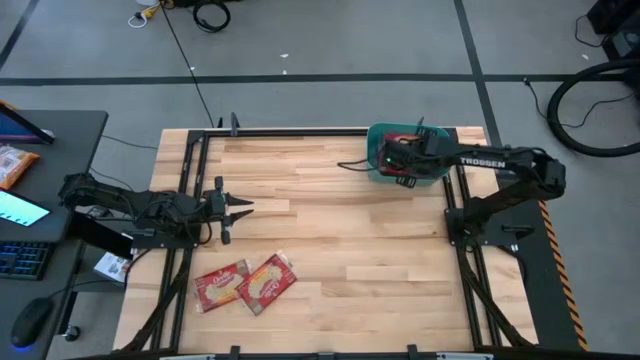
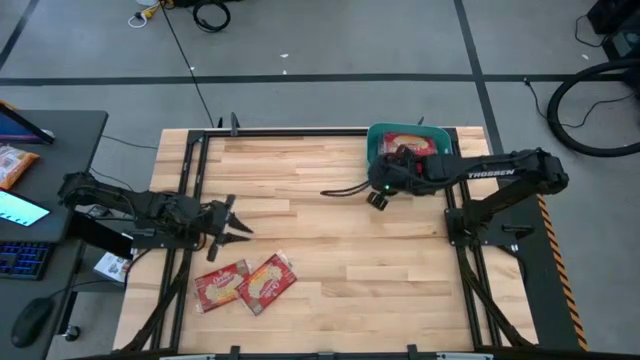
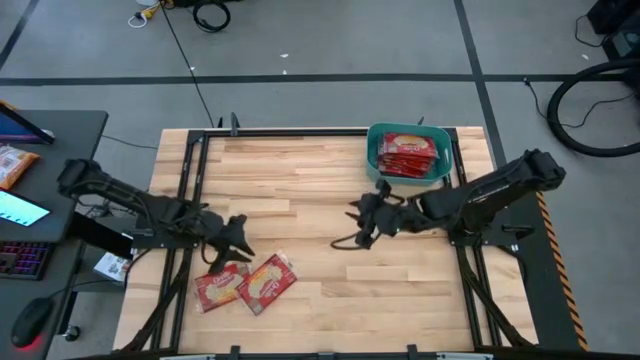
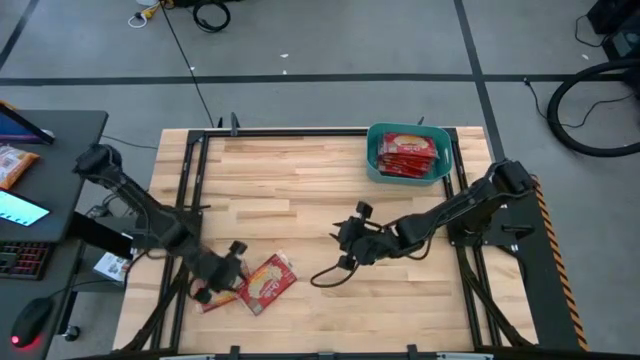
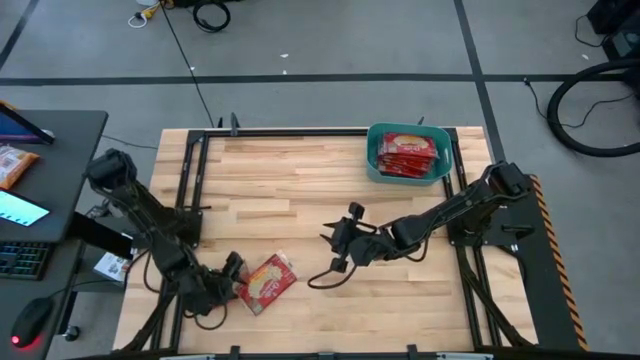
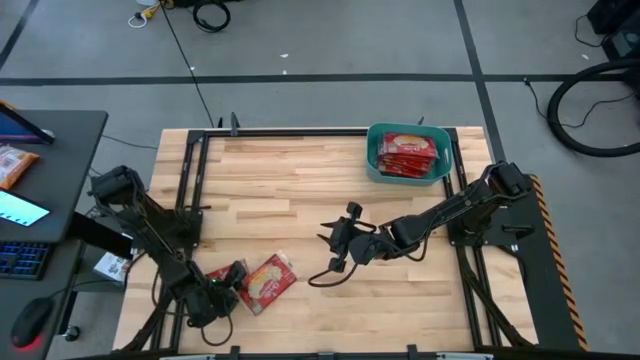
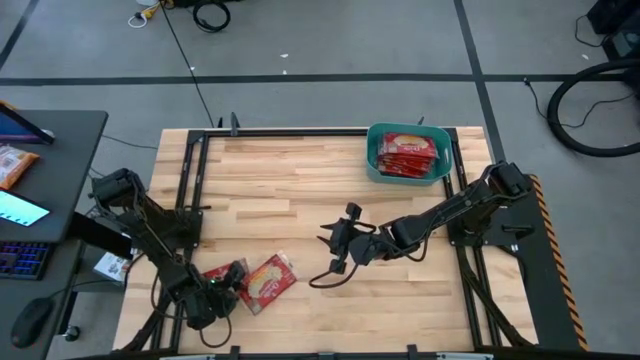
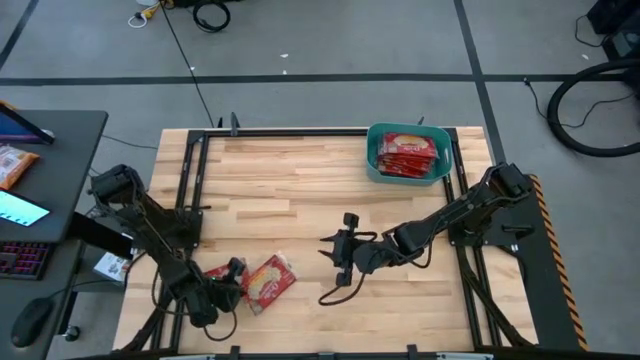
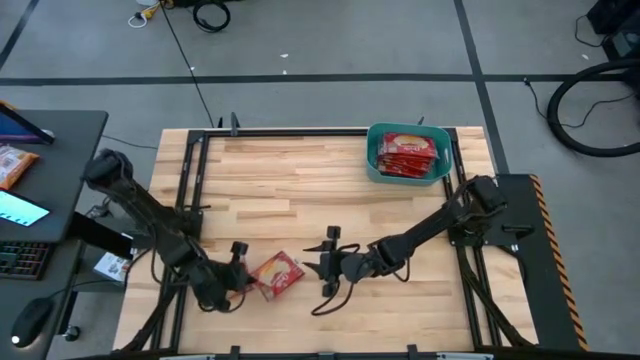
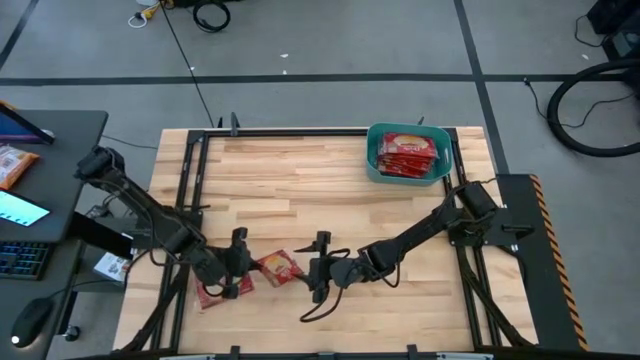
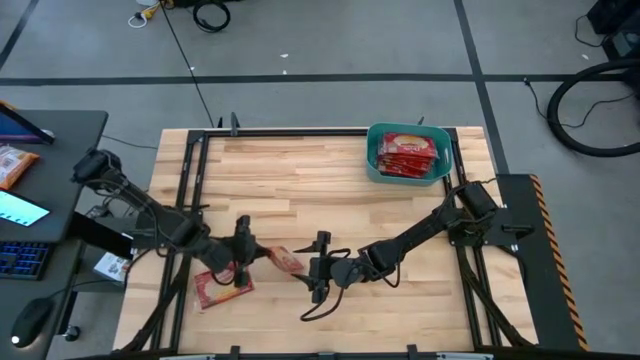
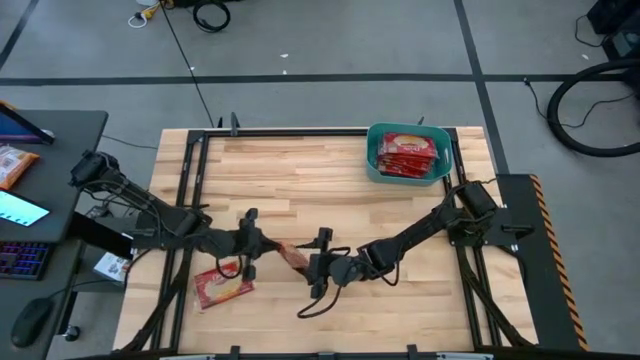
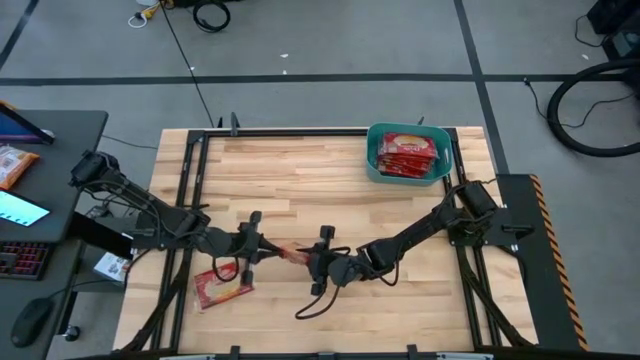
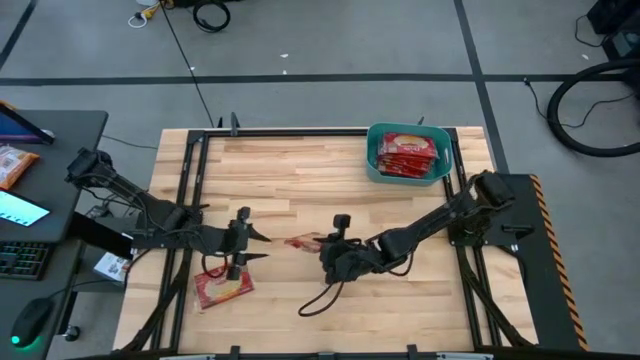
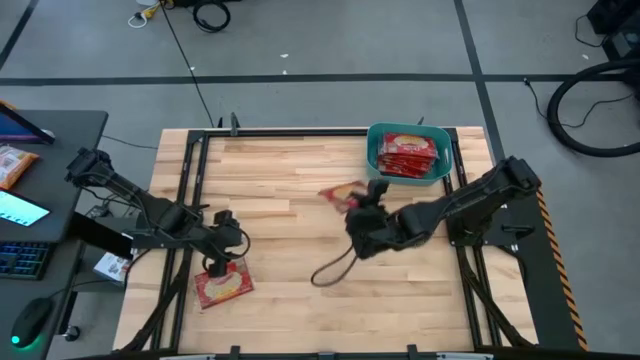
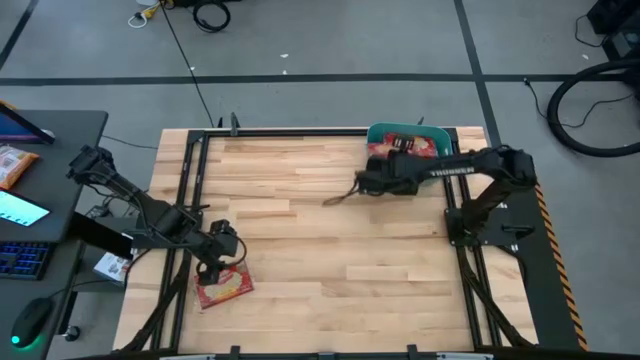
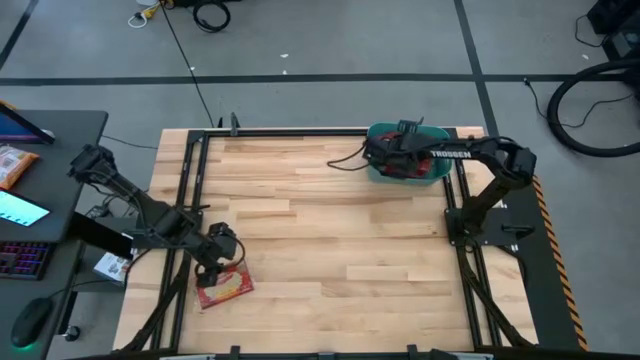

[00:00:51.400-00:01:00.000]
Task: Sort popcorn bags into baskets
Put the red popcorn bag into the blue bin

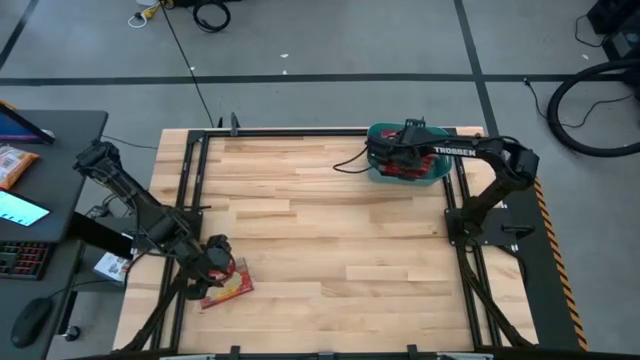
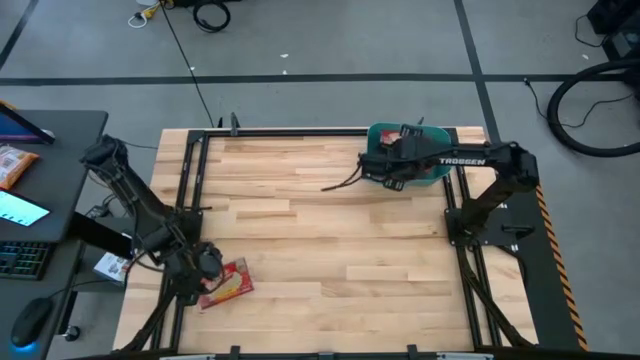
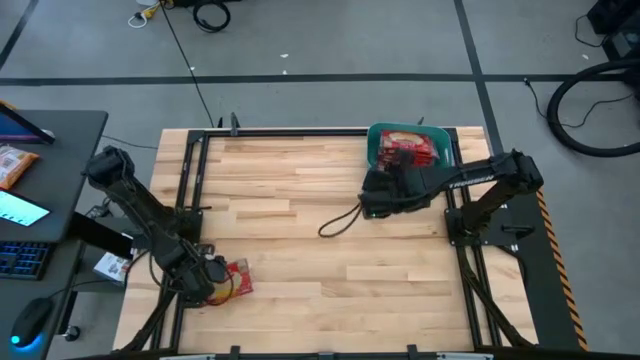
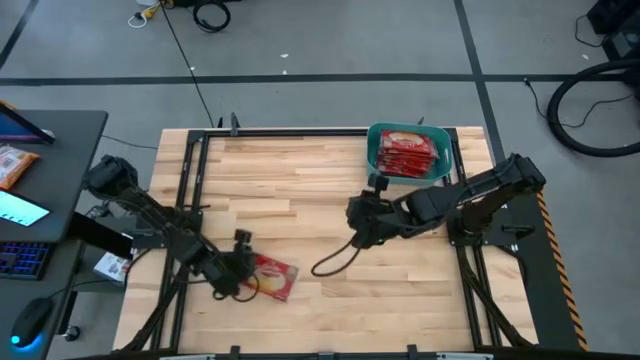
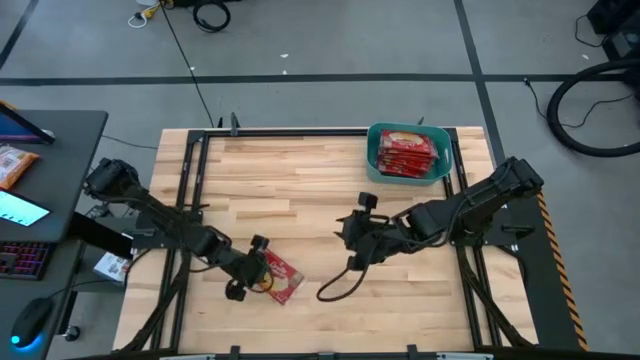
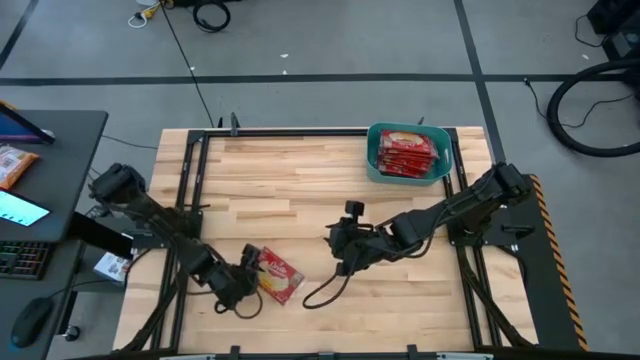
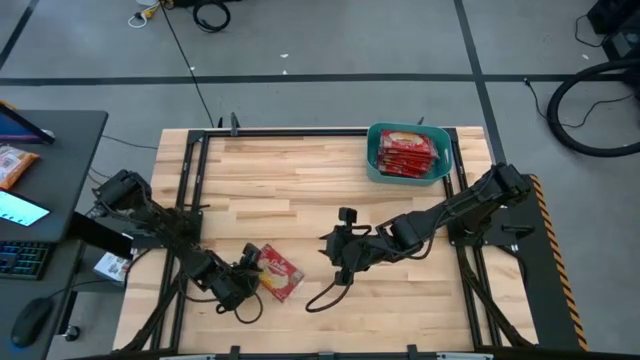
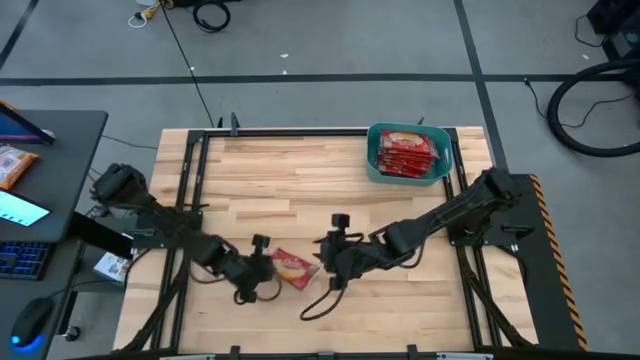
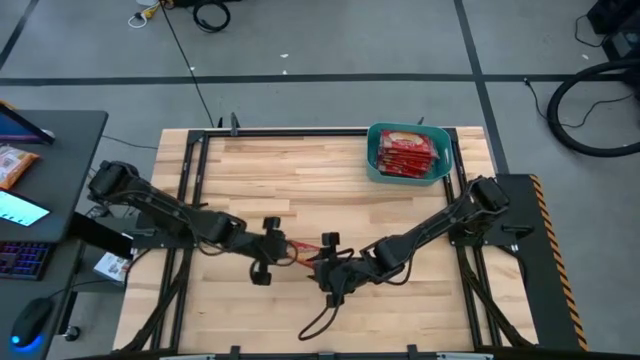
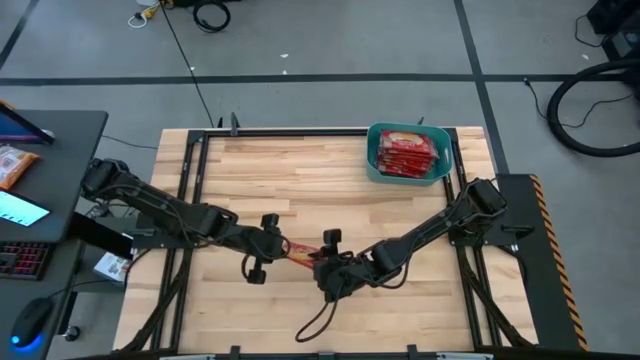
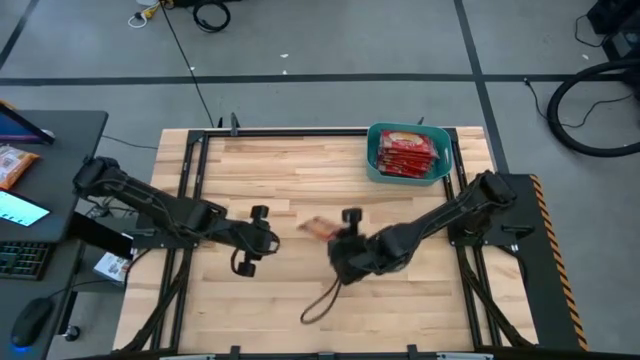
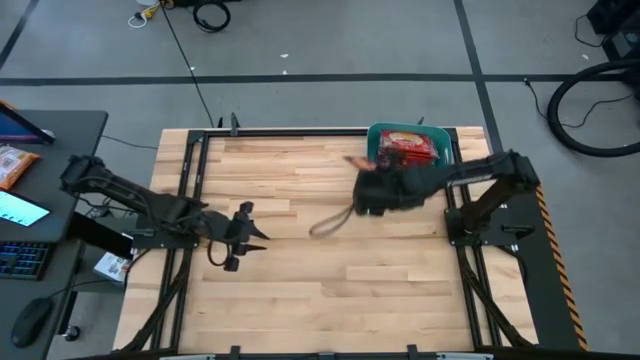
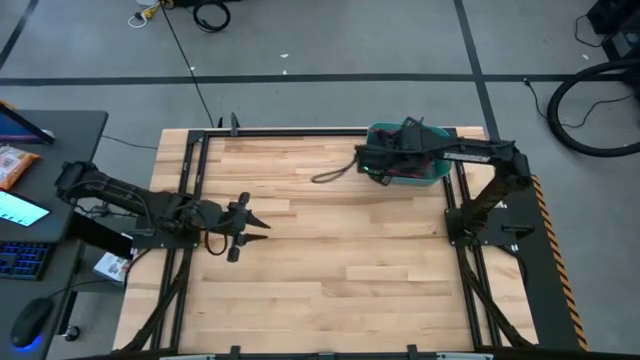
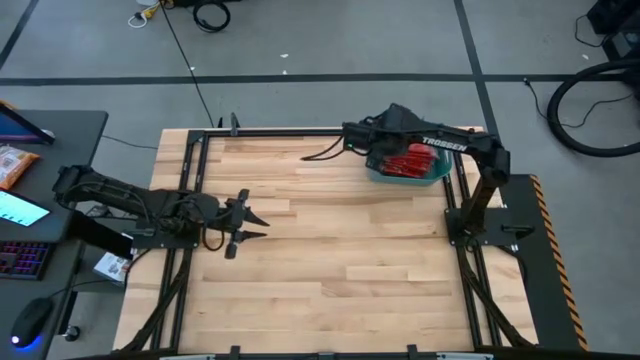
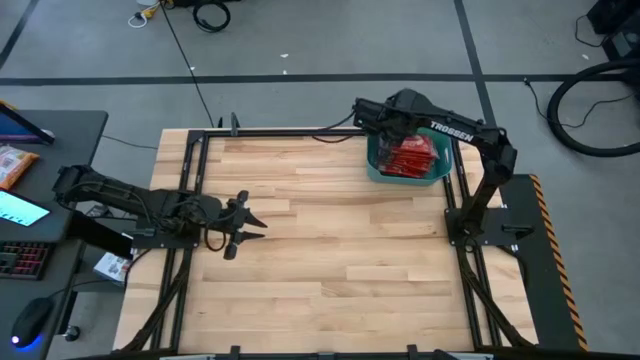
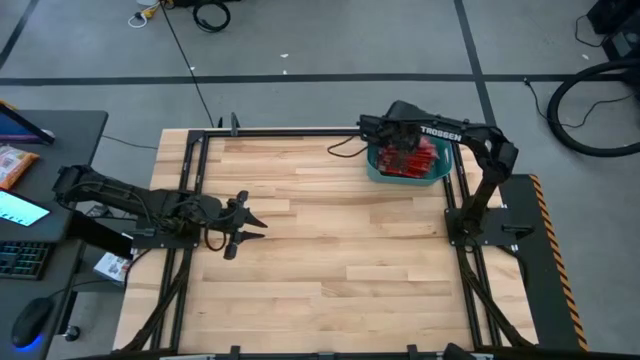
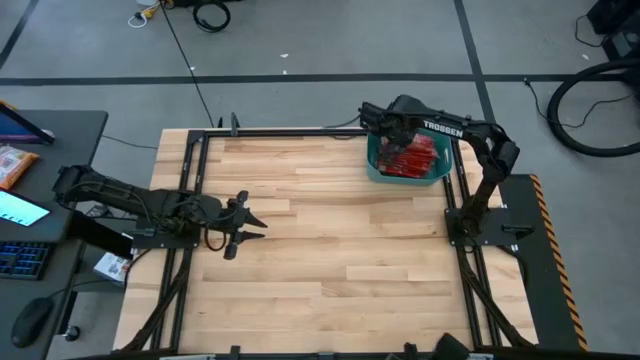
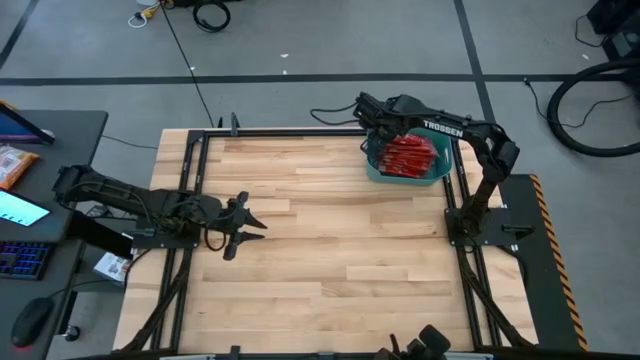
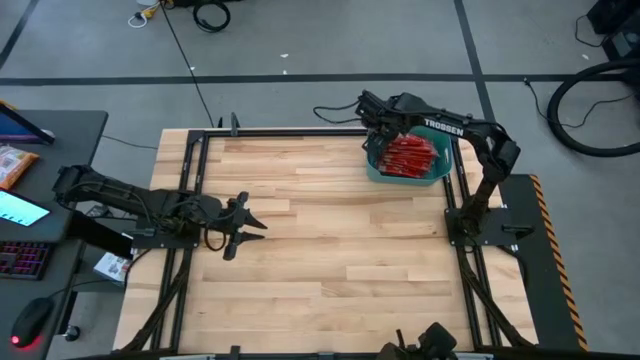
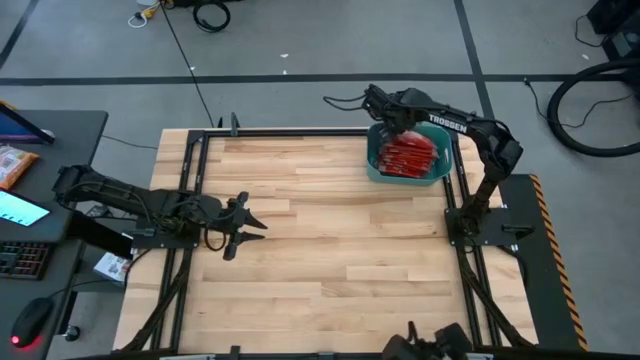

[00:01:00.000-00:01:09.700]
Put the red popcorn bag into the blue bin

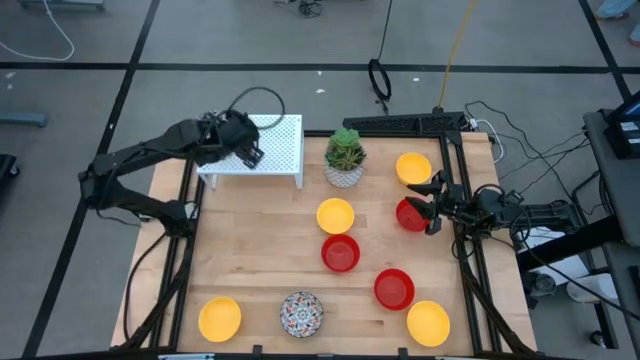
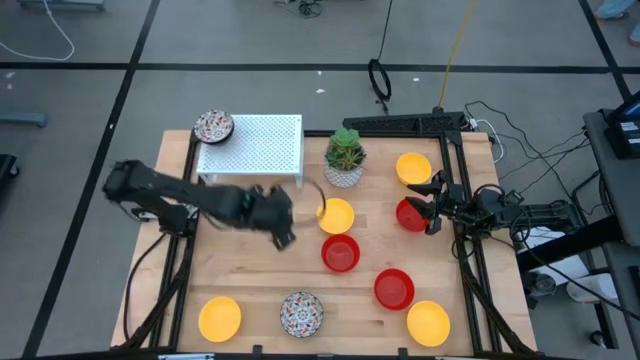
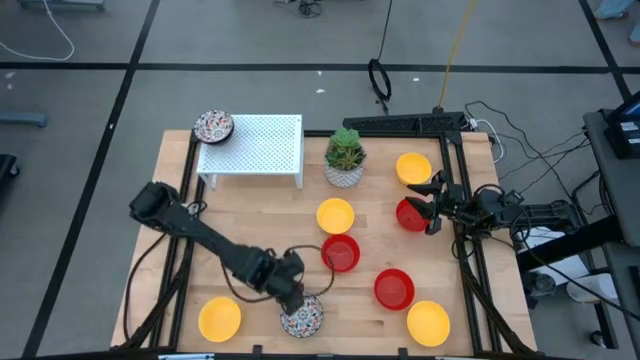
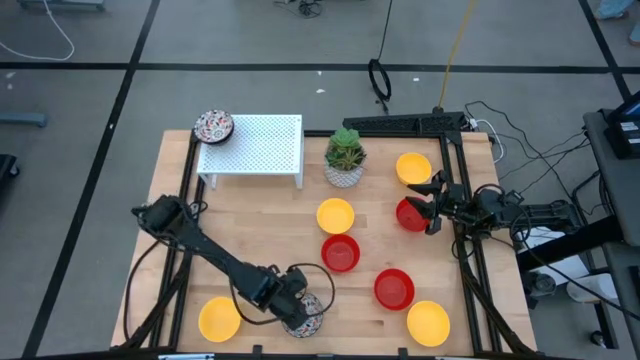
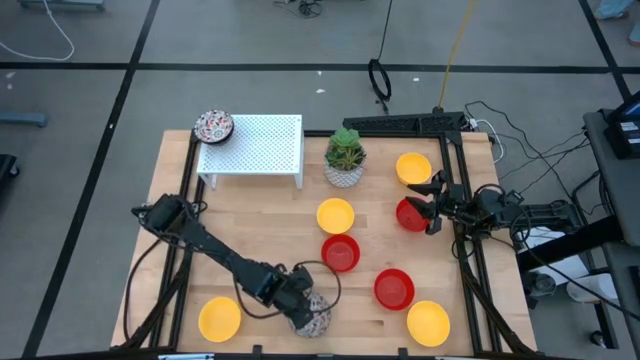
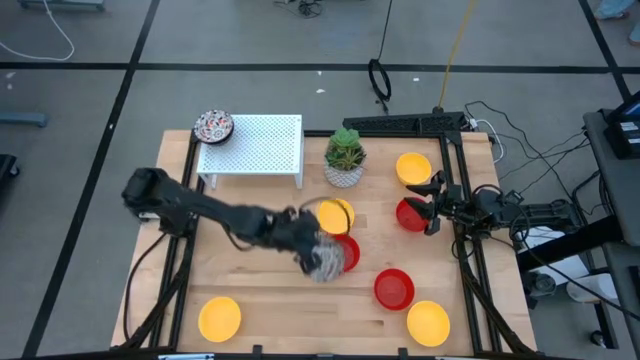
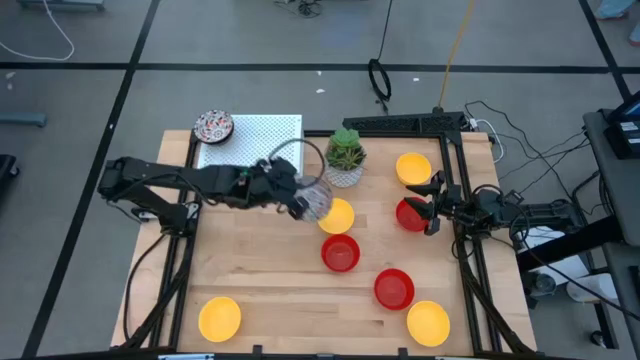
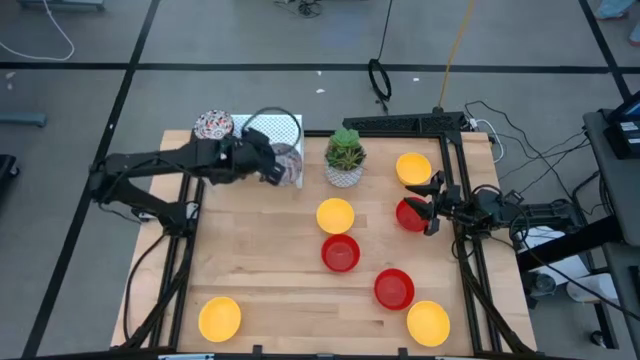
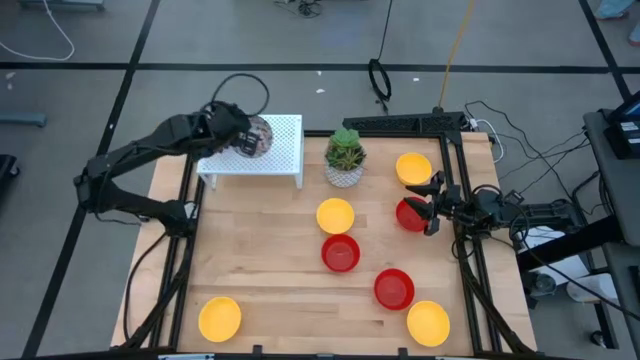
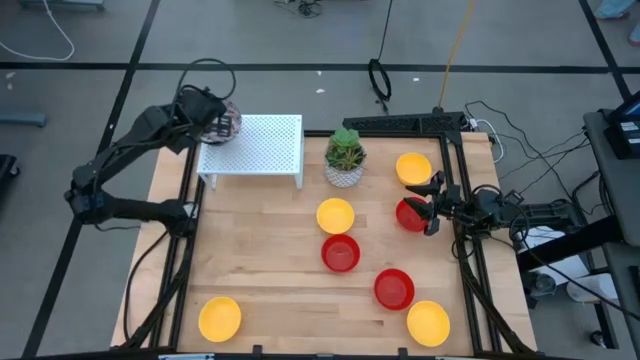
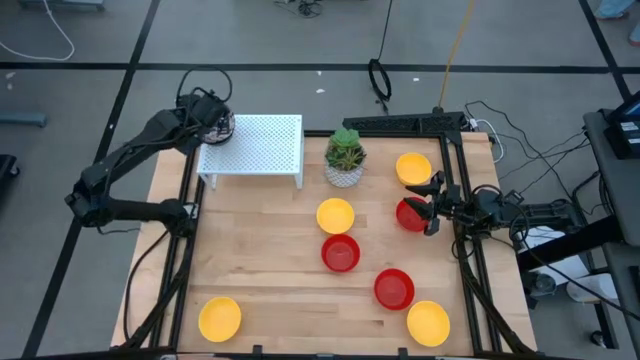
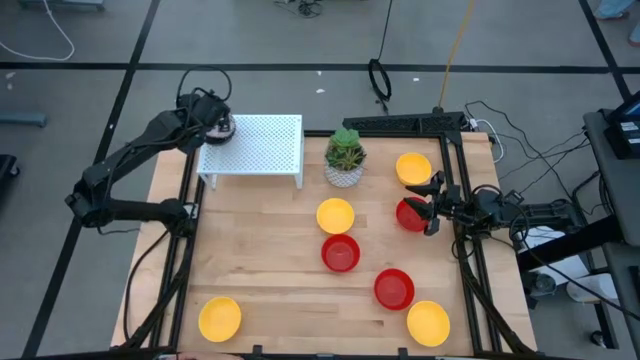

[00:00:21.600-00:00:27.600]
Task: Pick & Place Mini bowls
Stack the orange patterned bowl on top of the orange patterned bowl on the shelf
